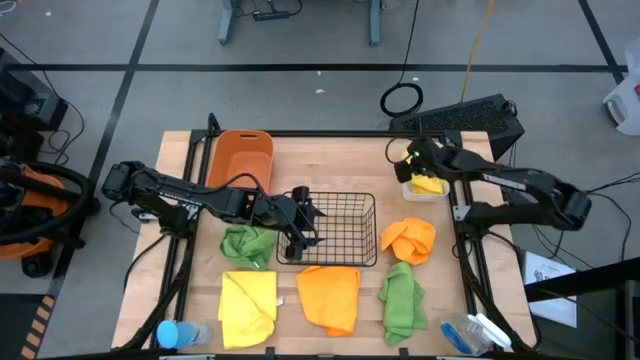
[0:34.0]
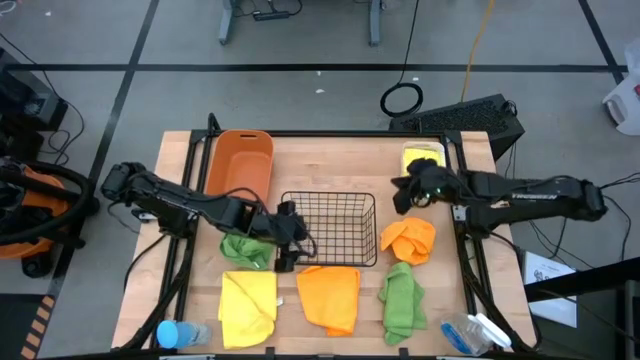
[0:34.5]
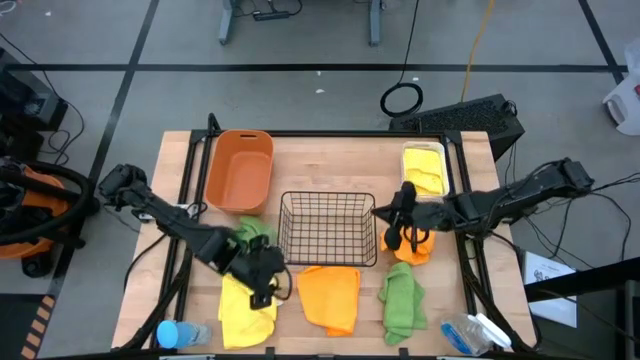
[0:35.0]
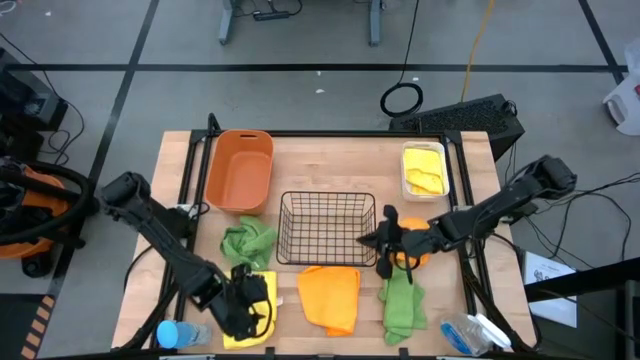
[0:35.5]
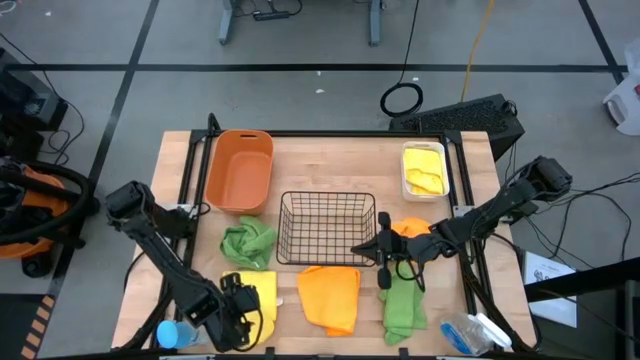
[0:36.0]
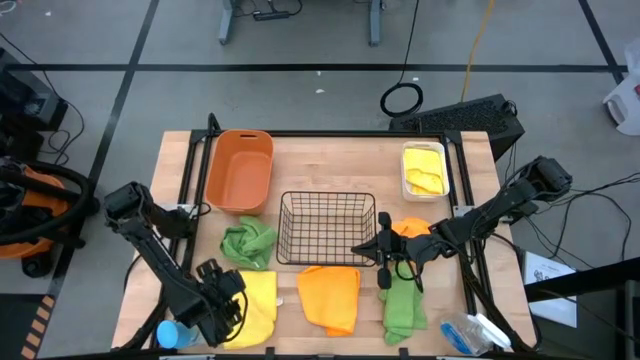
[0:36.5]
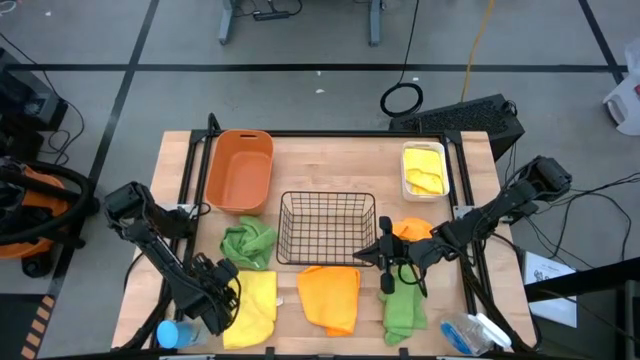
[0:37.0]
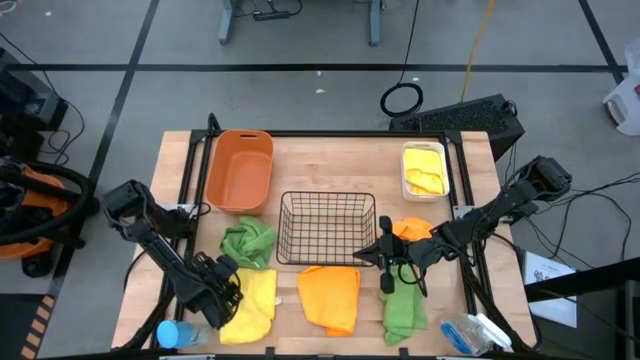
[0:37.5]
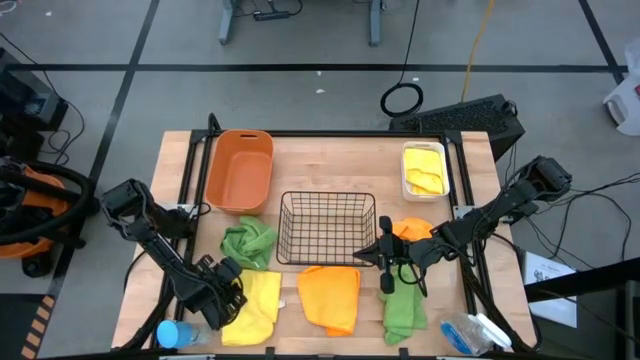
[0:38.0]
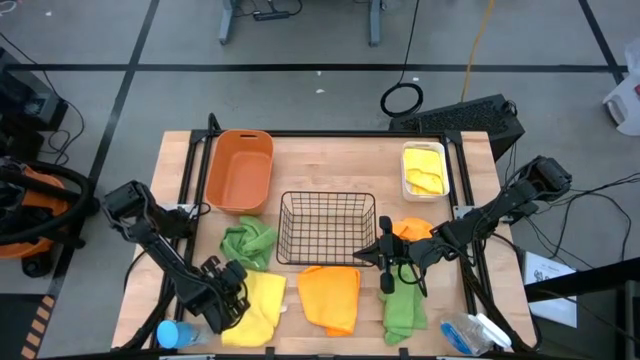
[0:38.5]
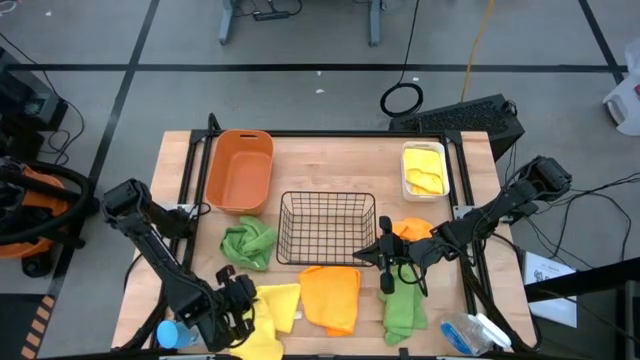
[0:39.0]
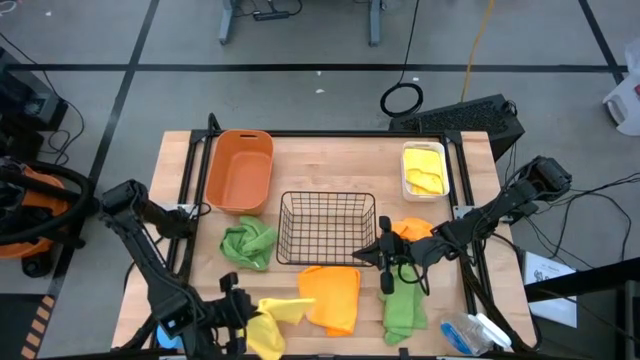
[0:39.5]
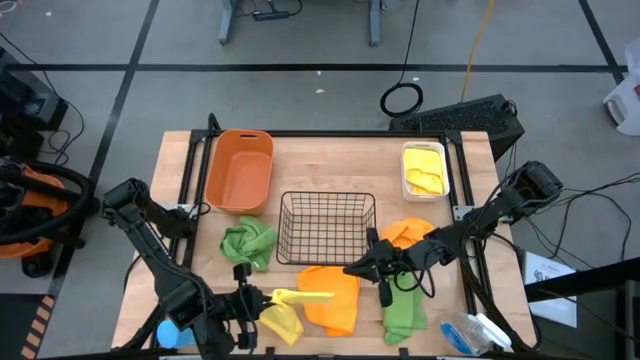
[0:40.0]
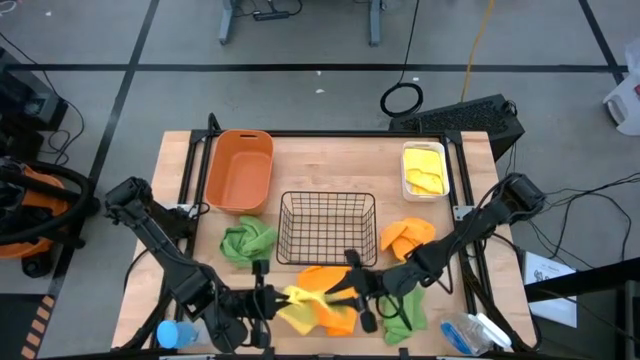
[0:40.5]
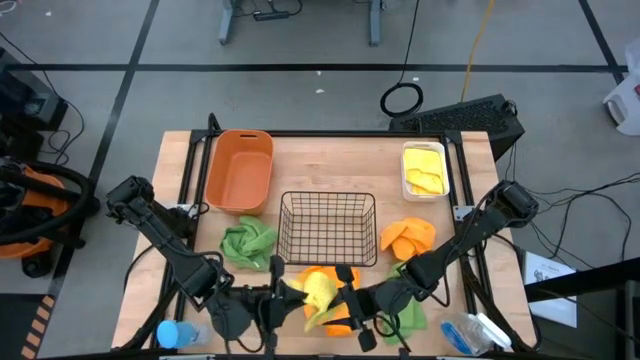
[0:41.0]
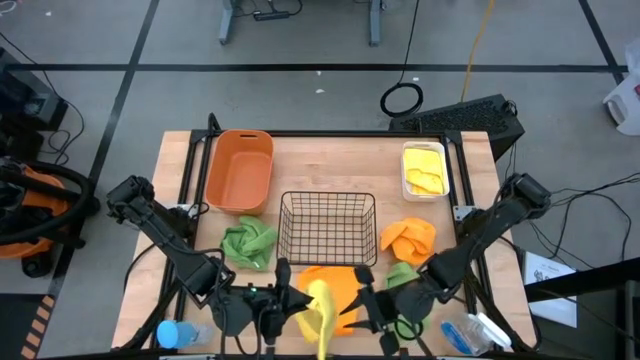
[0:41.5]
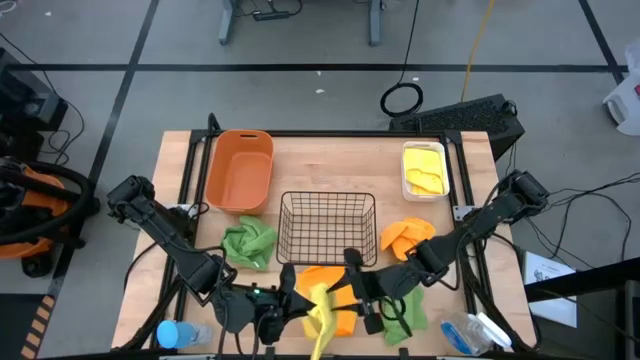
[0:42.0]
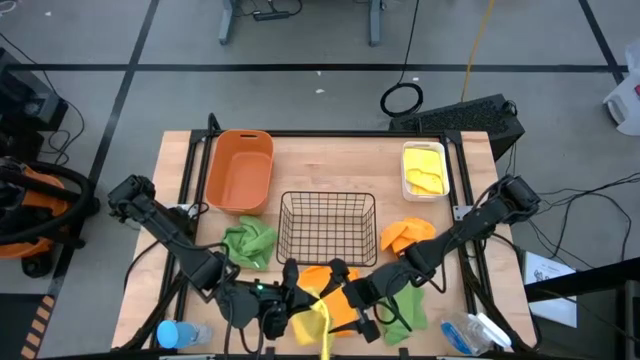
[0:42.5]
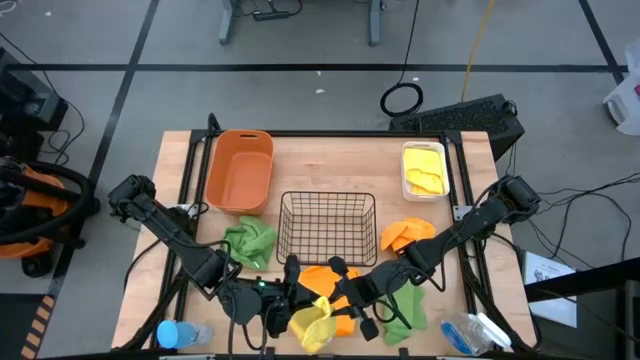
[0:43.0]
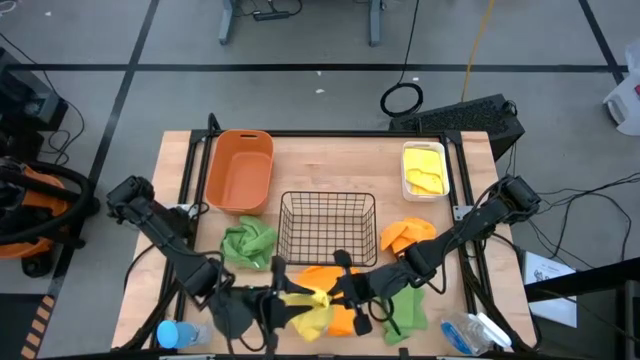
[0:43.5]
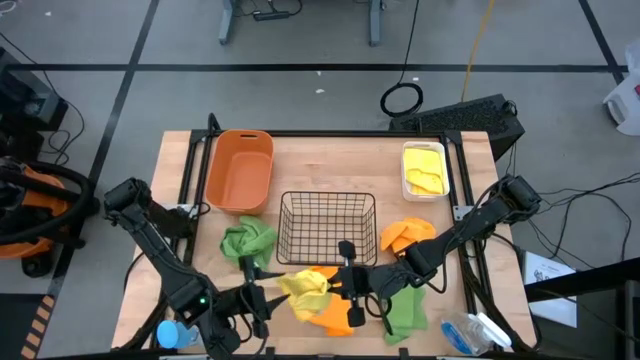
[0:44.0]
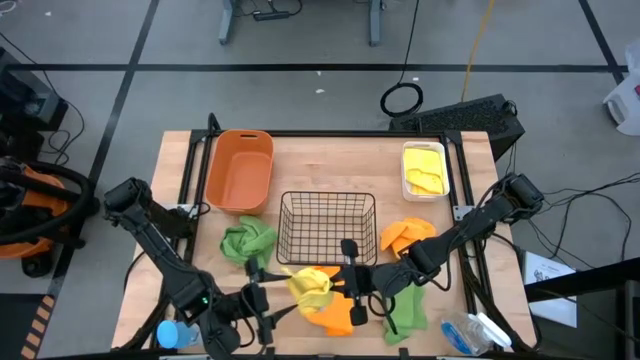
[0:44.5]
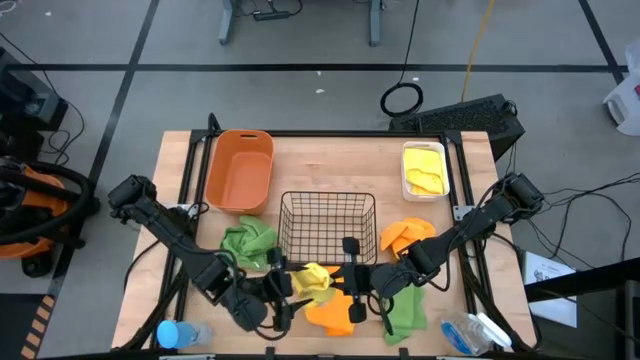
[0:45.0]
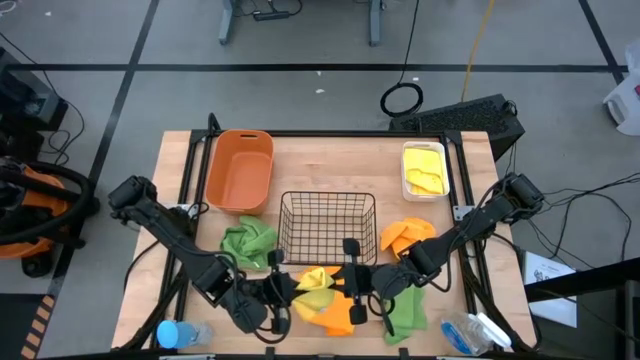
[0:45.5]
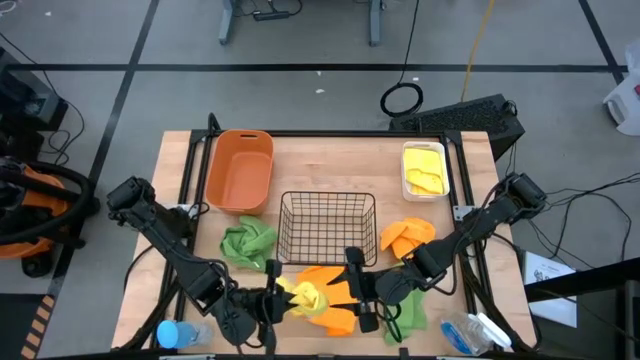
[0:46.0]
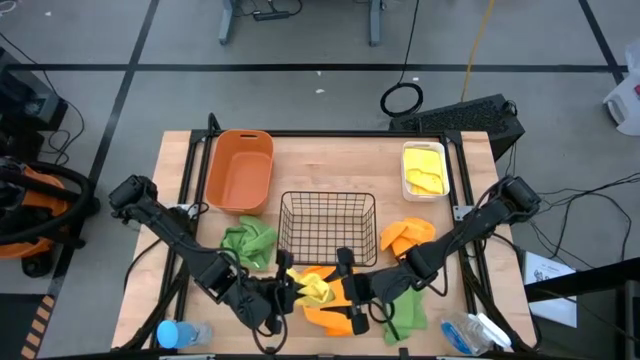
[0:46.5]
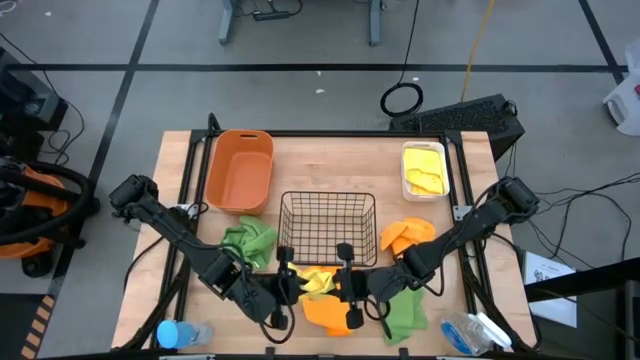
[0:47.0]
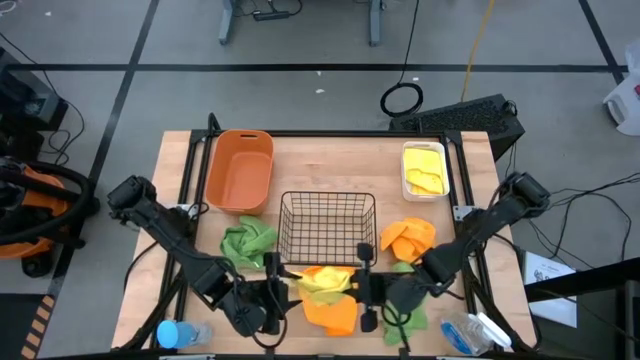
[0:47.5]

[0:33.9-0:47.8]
Task: Sort microfiber towel by color & place in baskets
Put the yellow microfiber towel into the white bin

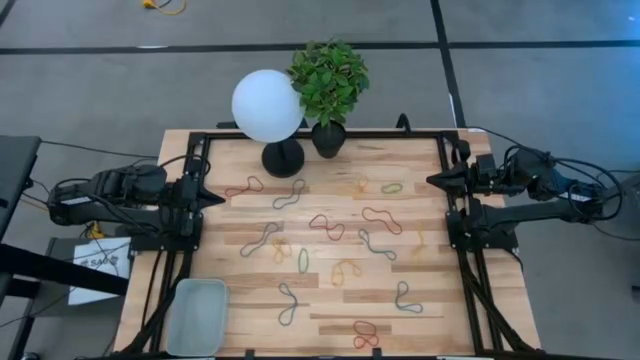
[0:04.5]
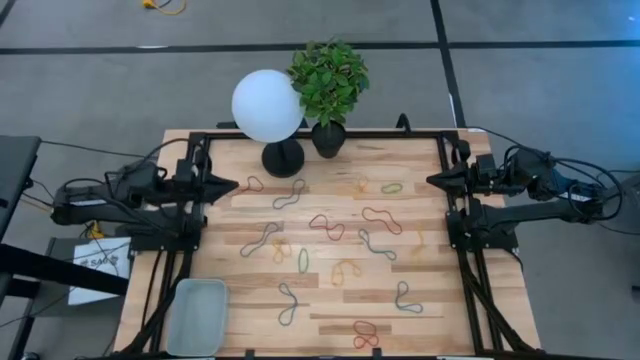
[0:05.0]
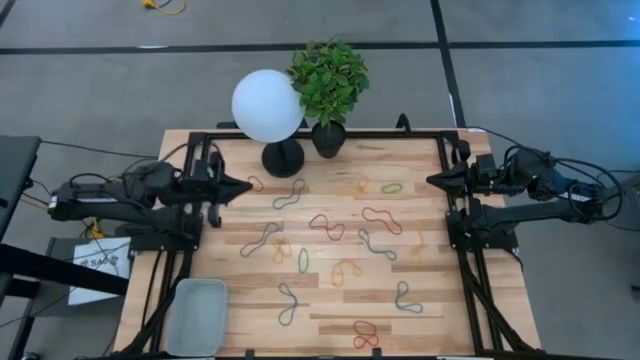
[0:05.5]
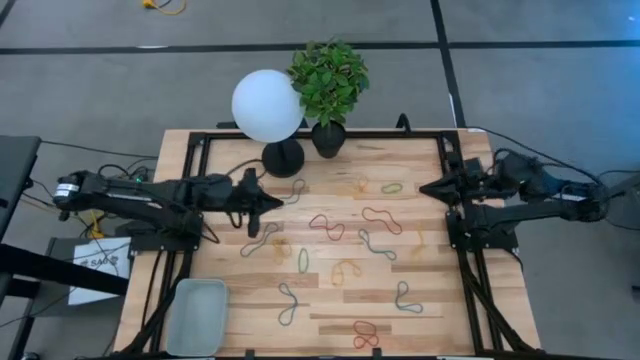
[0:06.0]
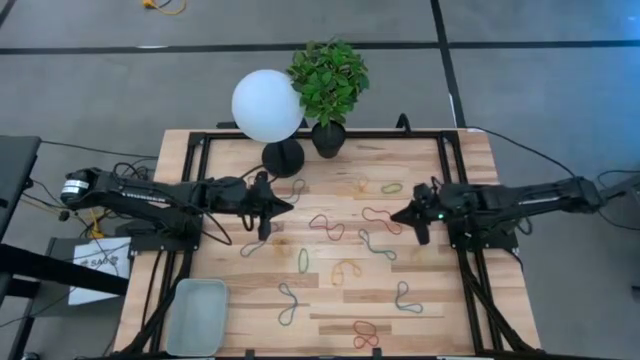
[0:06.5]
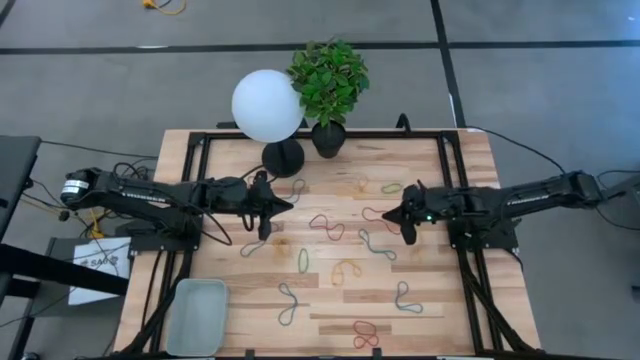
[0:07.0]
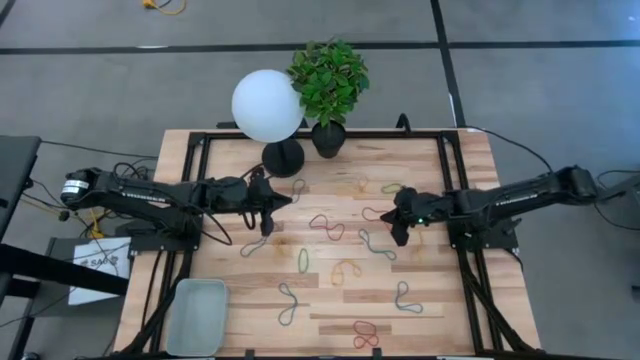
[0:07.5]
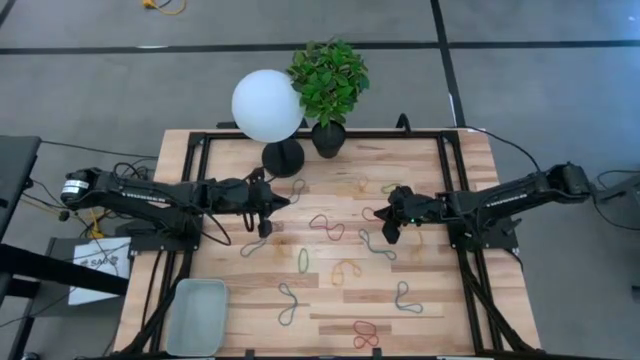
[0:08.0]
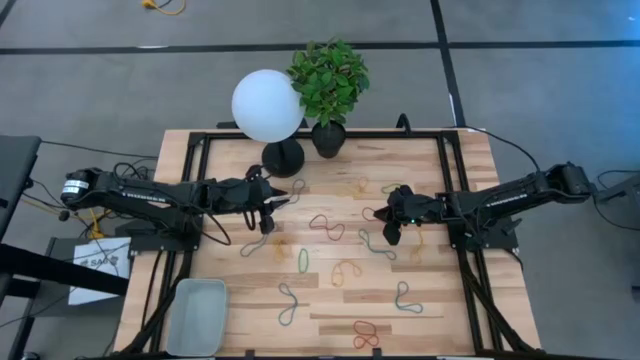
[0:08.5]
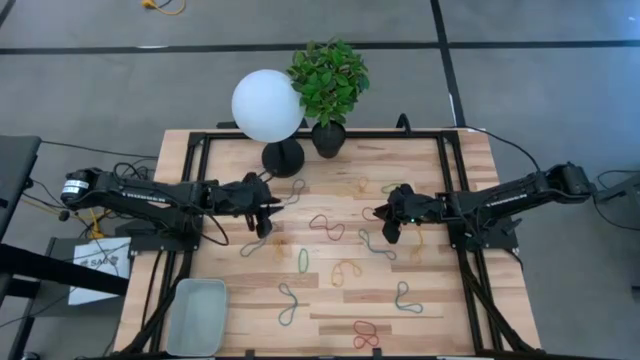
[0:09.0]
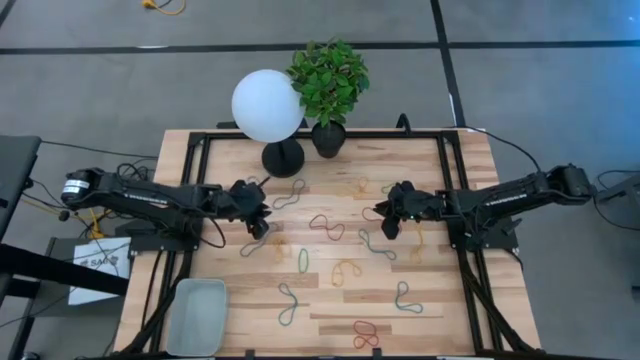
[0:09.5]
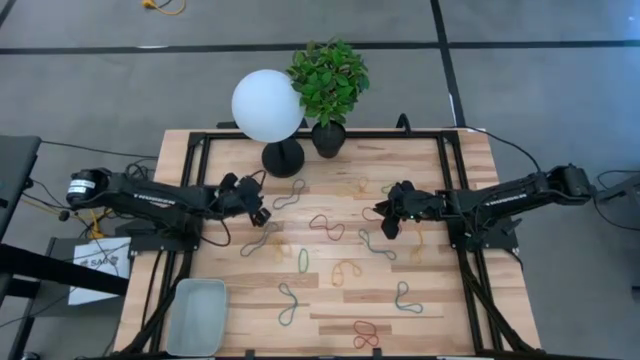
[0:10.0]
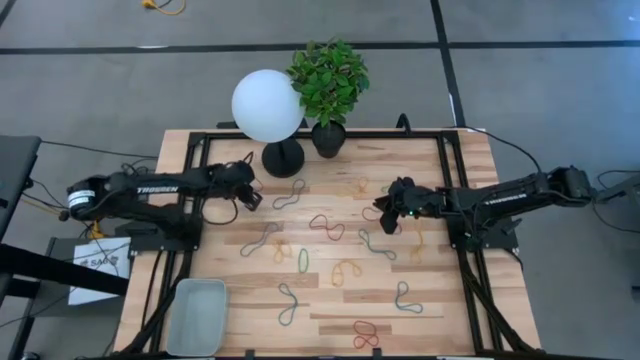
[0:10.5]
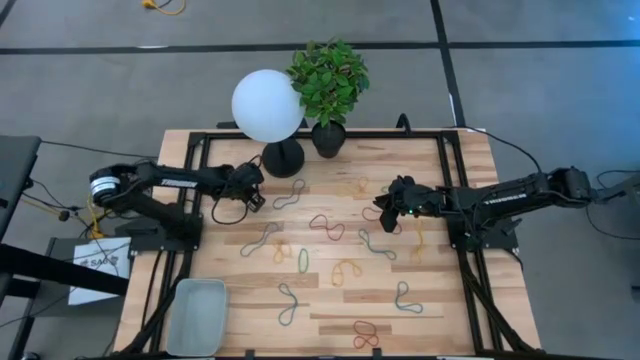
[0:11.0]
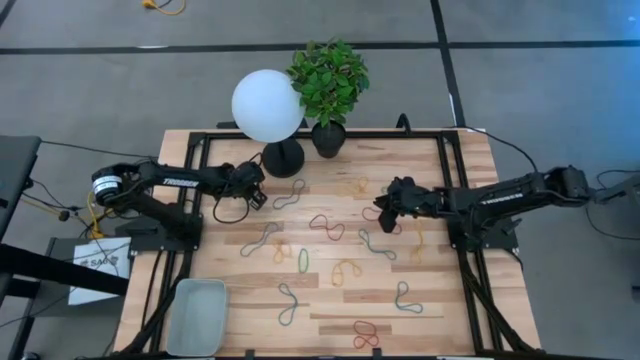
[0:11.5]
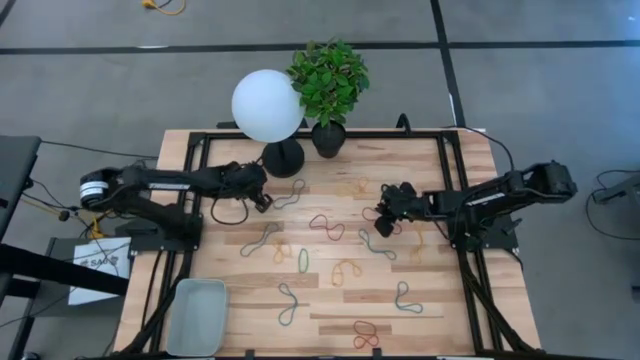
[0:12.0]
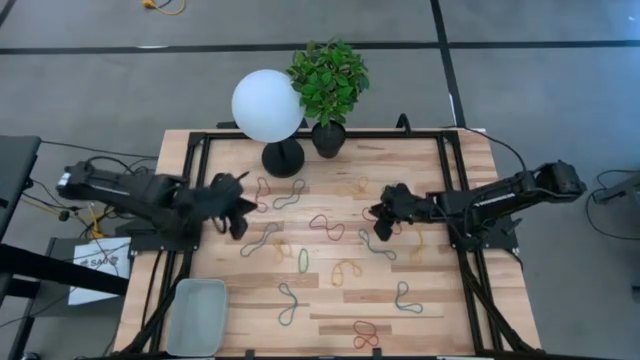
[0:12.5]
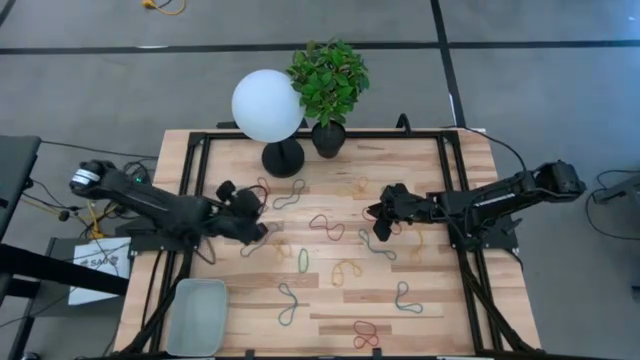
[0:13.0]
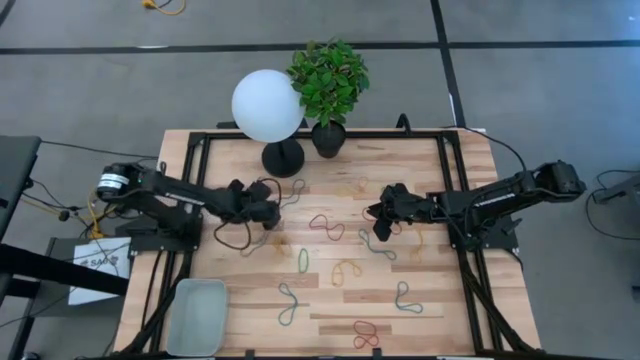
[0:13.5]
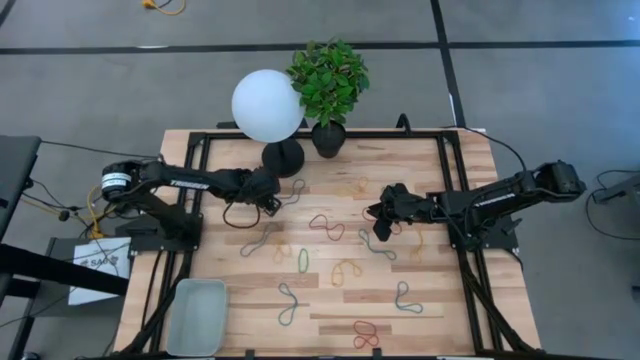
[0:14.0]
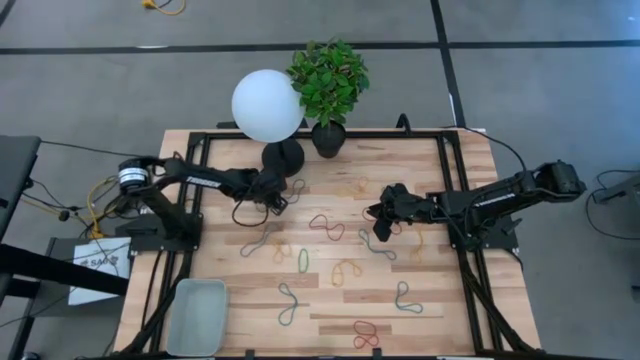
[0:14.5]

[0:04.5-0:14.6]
Task: Pick and place items into bin
Put the red rubber band into the gray bin
